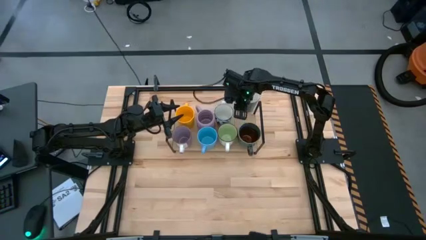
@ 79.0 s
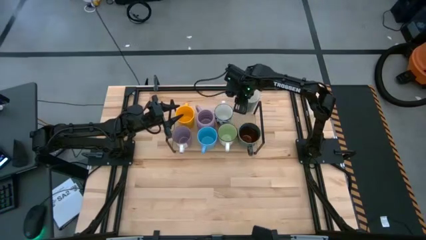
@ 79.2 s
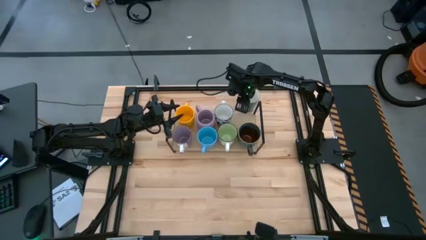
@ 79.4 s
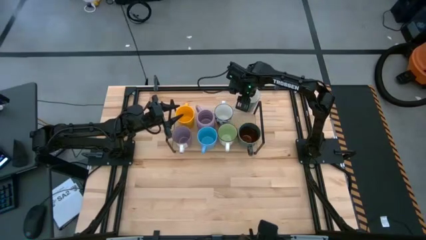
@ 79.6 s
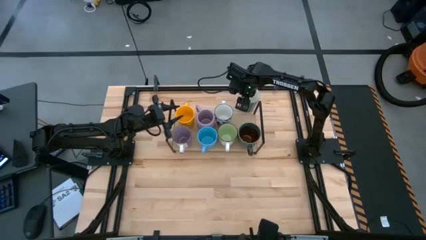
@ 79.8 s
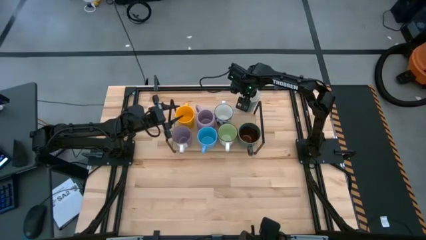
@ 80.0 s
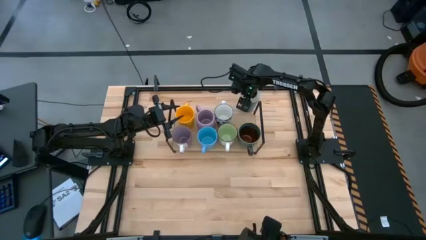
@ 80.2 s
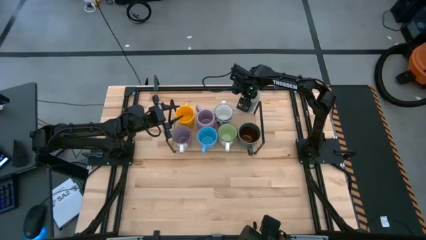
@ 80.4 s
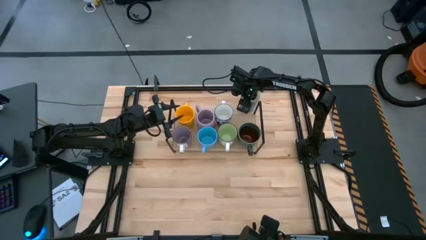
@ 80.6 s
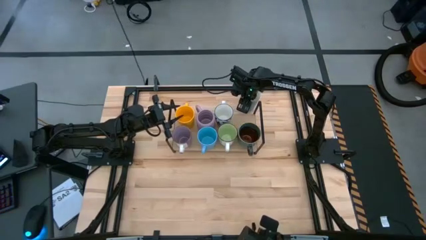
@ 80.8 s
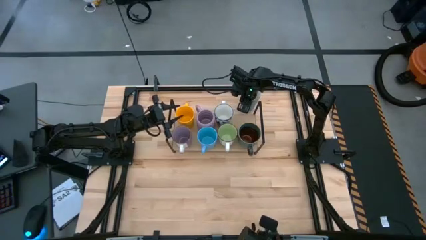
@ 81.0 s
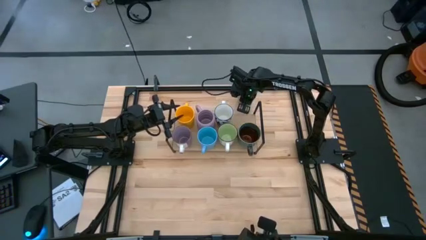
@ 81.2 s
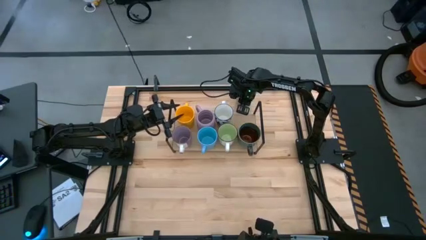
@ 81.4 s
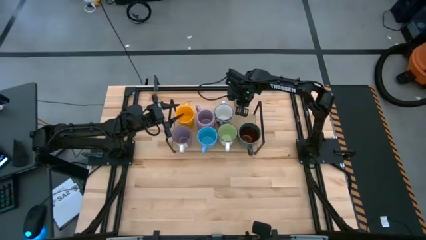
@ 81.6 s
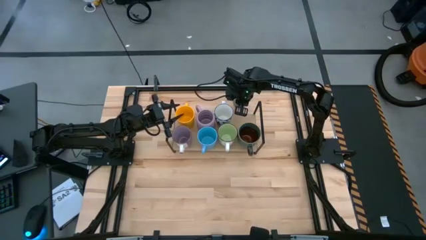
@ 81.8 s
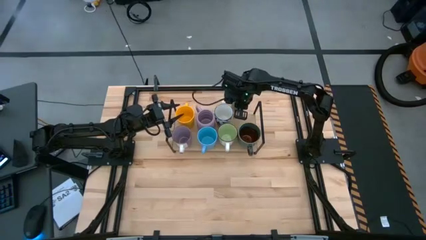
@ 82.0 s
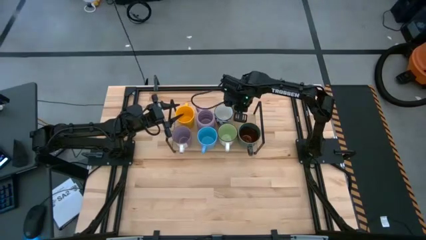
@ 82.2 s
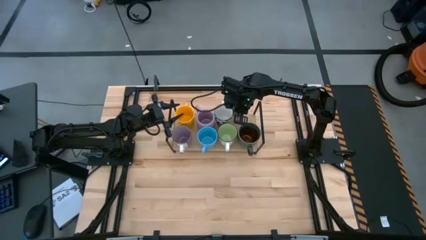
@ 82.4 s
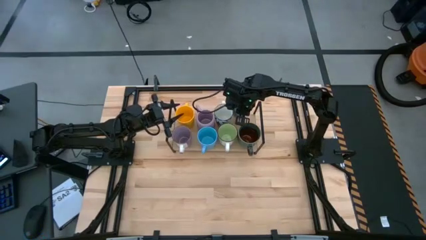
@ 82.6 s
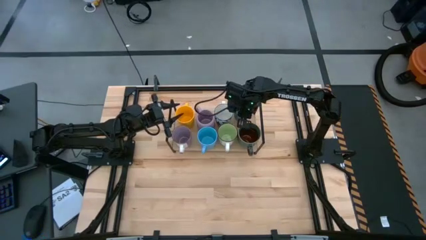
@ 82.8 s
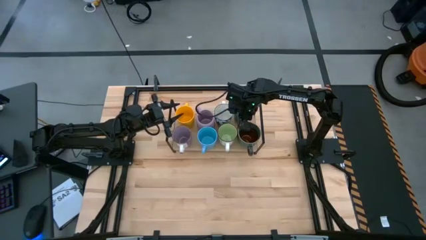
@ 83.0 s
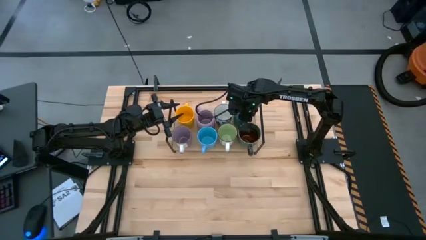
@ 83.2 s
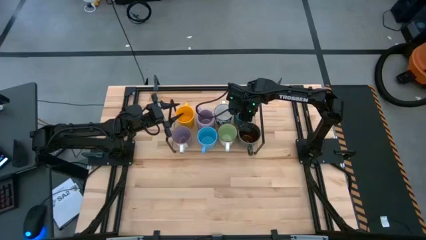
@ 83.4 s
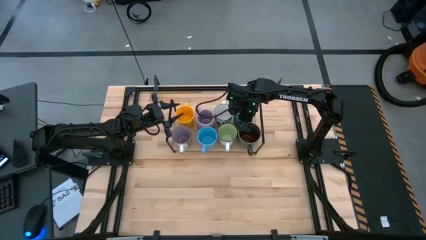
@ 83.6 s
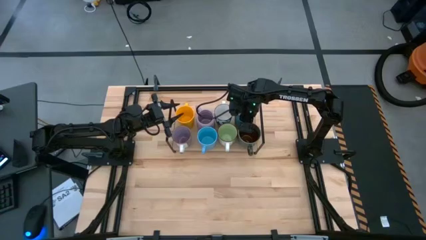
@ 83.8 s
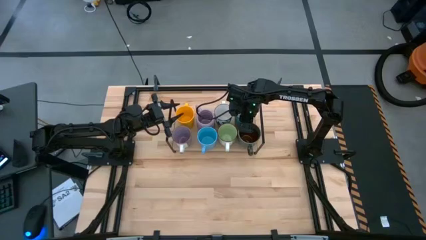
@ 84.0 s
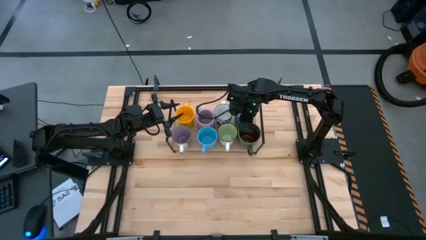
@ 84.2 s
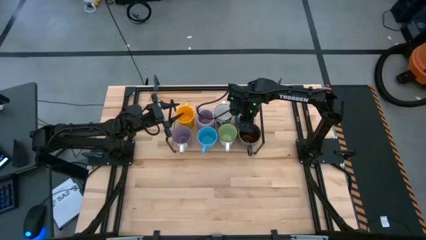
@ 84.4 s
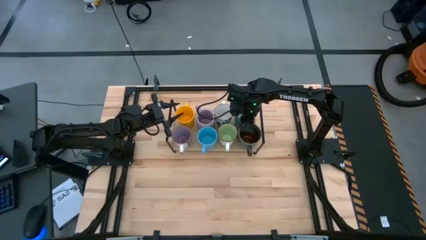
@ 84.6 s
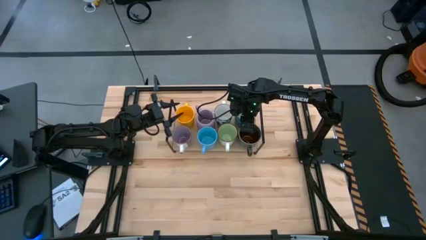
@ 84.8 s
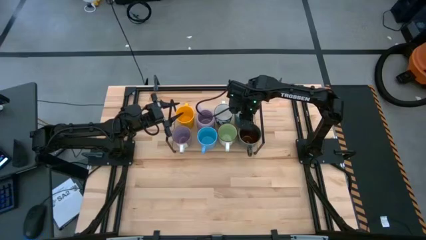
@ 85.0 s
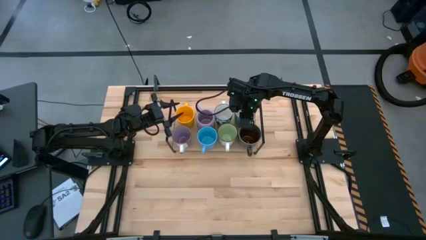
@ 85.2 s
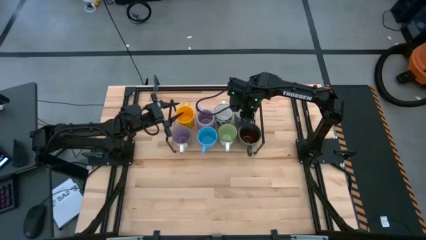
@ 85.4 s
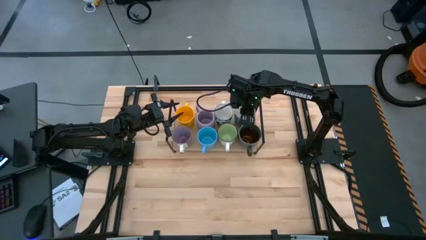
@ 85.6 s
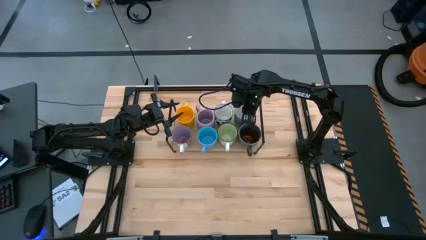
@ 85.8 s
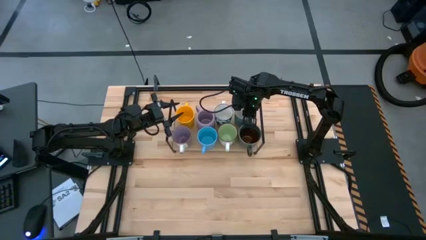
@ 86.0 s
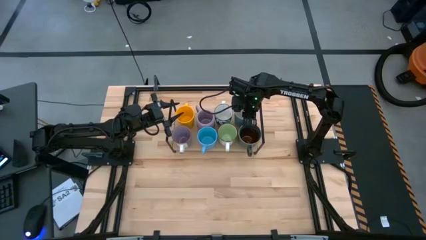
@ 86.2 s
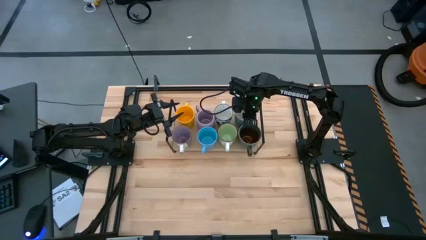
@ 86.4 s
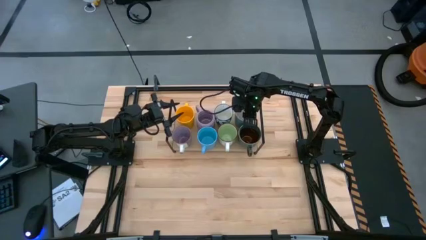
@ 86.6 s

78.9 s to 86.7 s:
Task: Place coffee mugs
Put the blue mug on the shelf

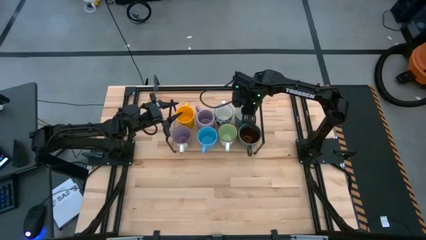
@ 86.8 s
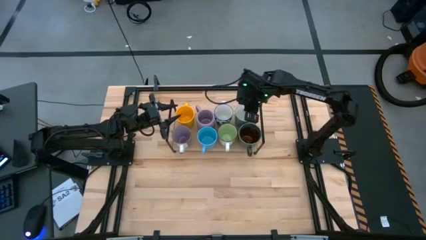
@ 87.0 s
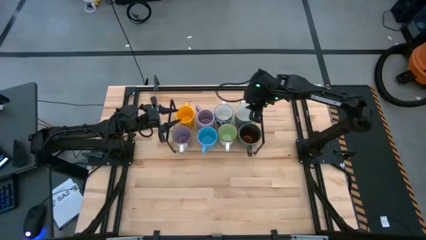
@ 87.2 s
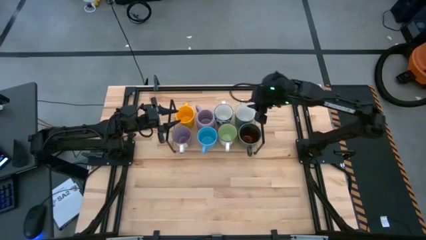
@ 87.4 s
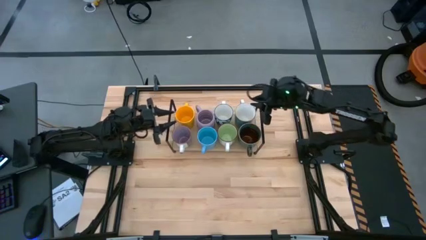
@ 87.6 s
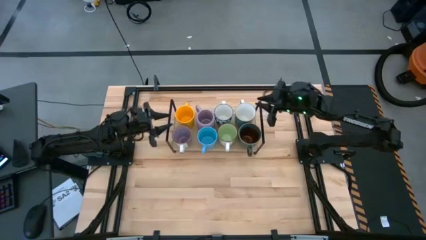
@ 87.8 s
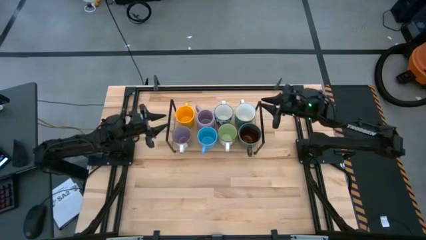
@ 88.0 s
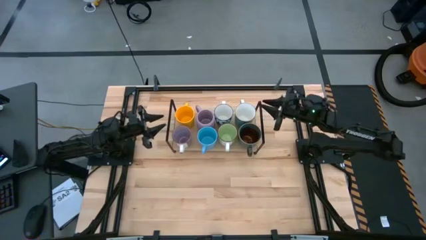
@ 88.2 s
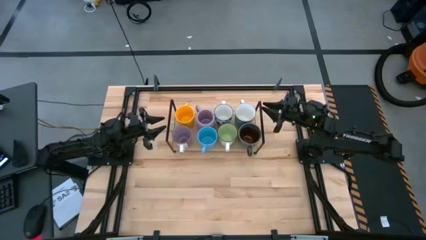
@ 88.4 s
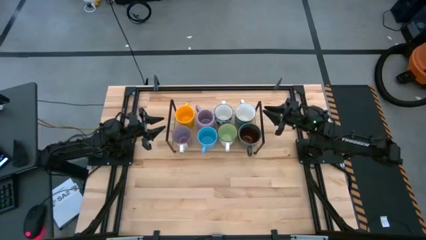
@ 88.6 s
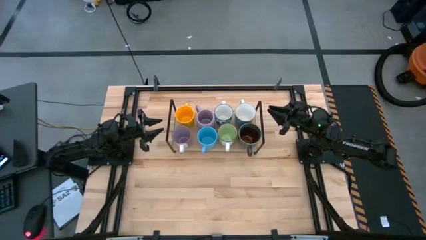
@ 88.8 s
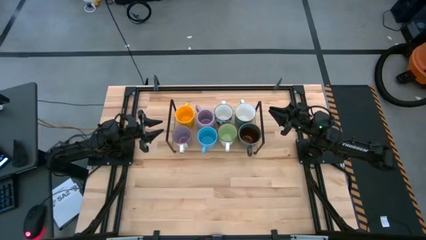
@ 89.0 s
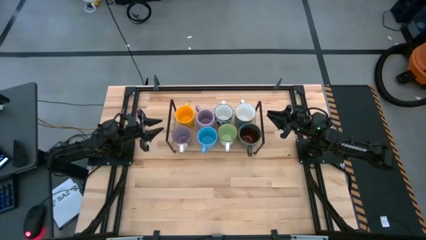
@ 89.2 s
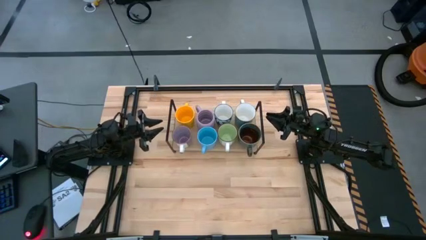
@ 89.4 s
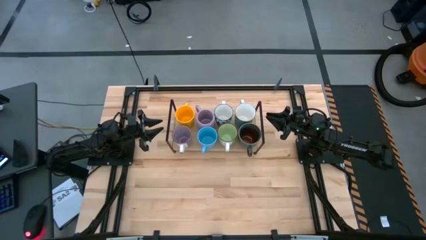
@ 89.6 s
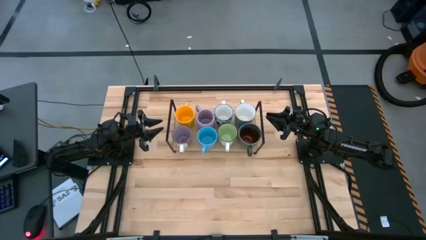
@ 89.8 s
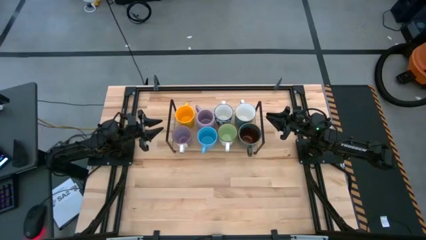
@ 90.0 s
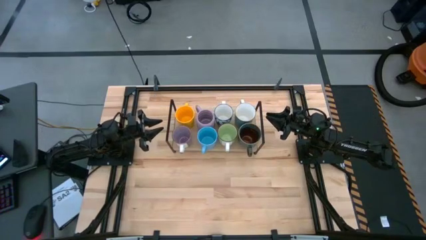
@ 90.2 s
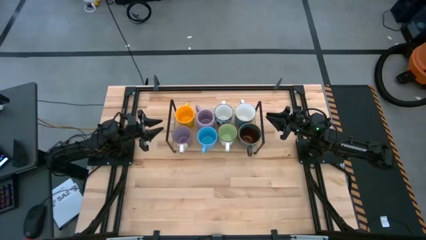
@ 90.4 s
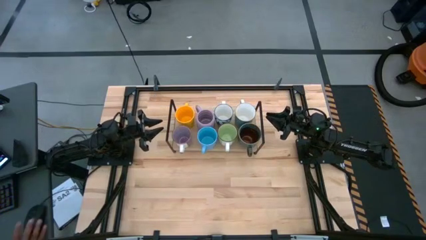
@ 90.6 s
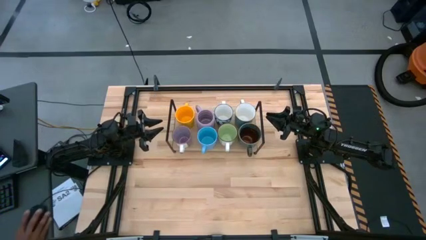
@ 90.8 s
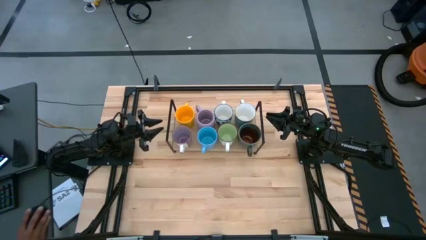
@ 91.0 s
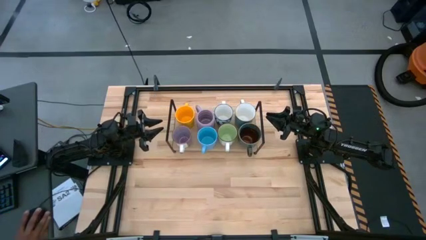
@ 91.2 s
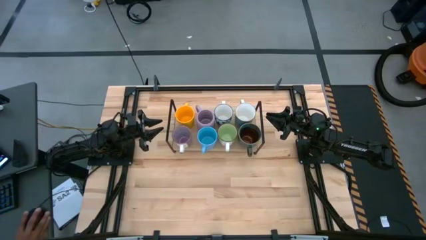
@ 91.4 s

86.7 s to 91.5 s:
Return to Home Position

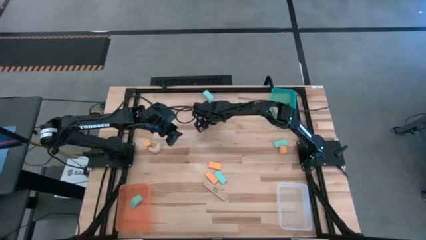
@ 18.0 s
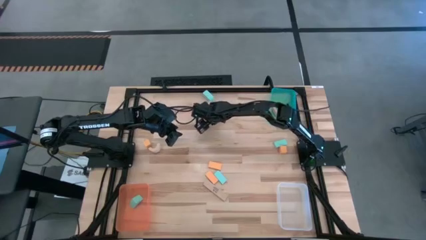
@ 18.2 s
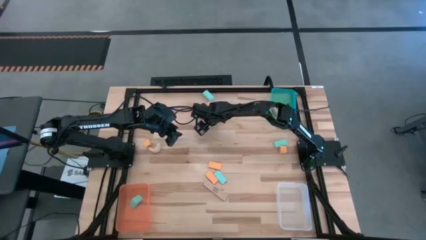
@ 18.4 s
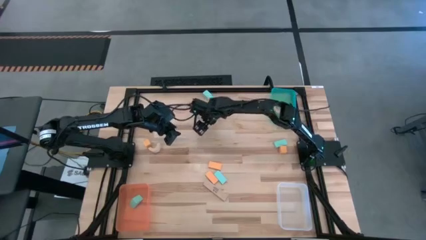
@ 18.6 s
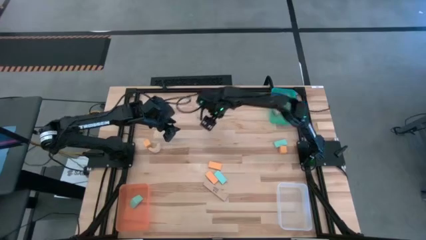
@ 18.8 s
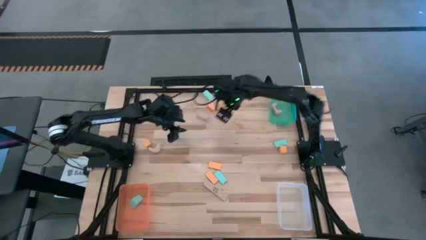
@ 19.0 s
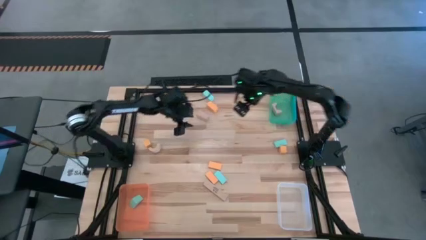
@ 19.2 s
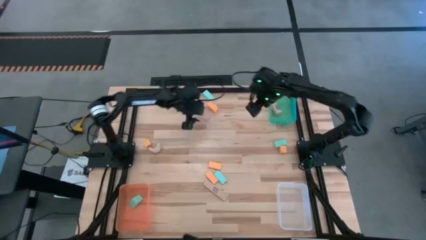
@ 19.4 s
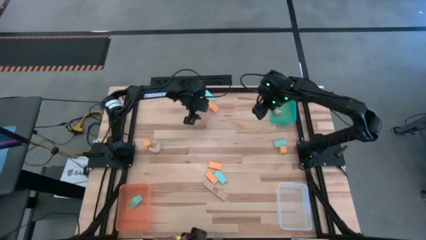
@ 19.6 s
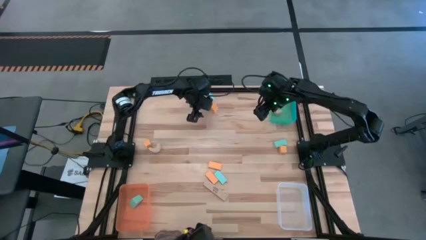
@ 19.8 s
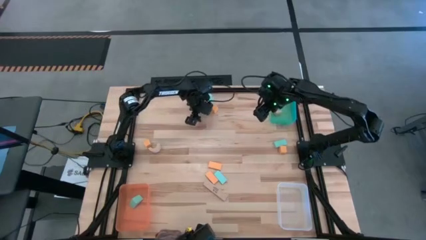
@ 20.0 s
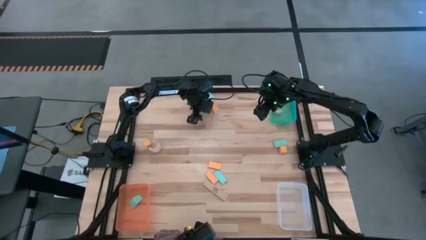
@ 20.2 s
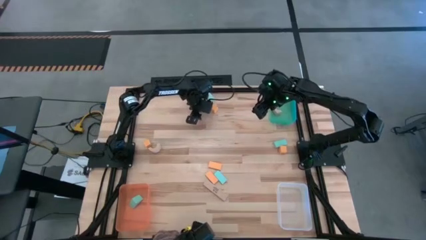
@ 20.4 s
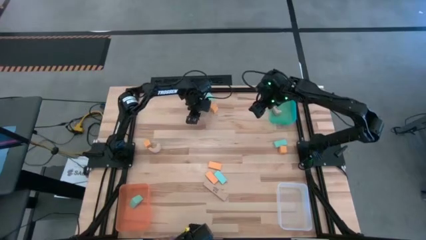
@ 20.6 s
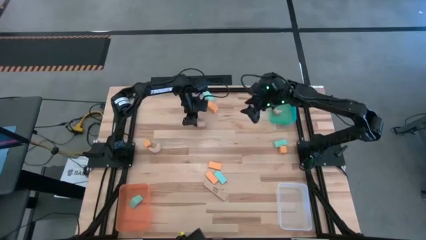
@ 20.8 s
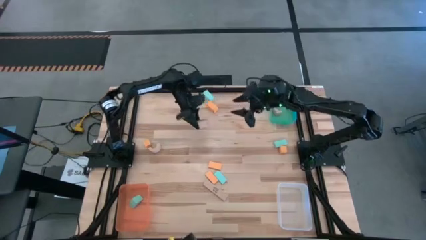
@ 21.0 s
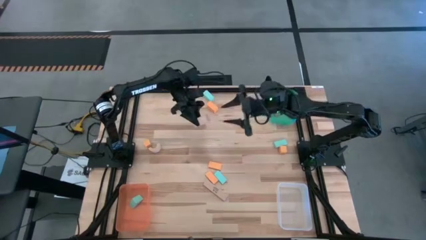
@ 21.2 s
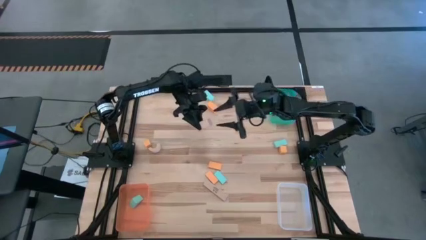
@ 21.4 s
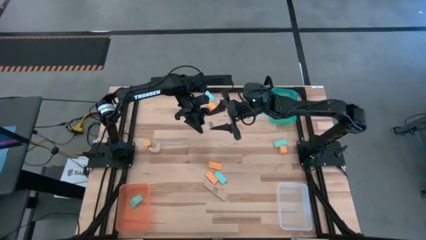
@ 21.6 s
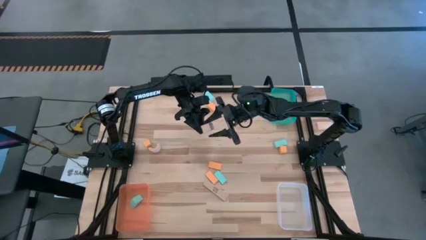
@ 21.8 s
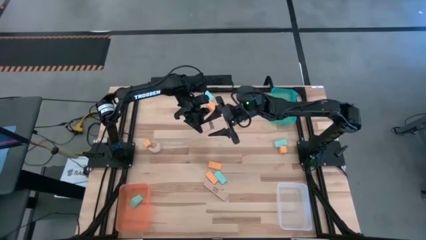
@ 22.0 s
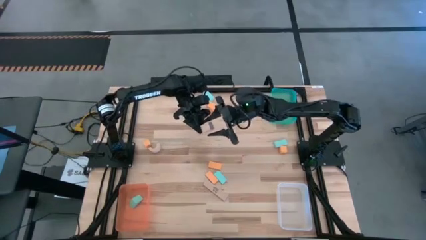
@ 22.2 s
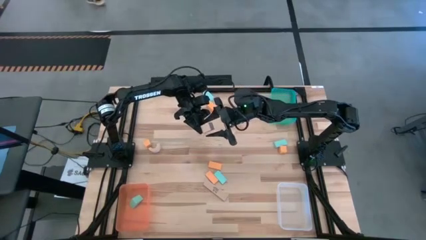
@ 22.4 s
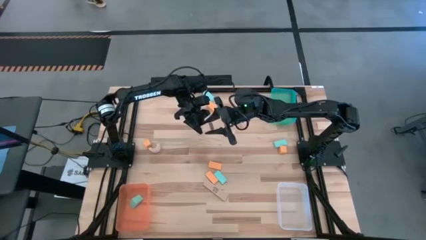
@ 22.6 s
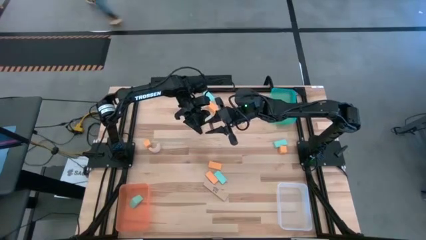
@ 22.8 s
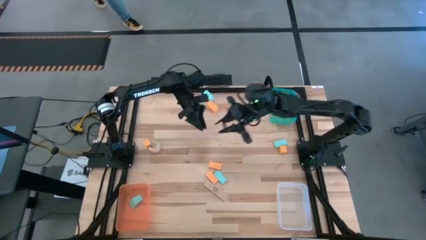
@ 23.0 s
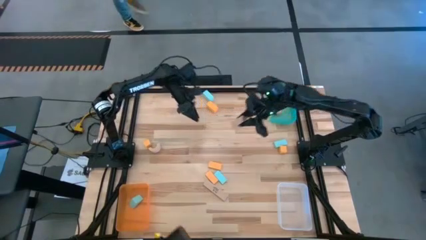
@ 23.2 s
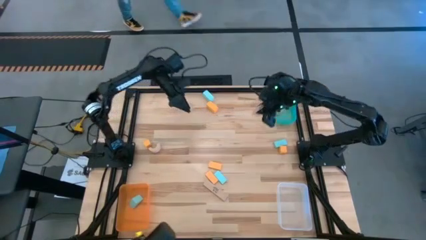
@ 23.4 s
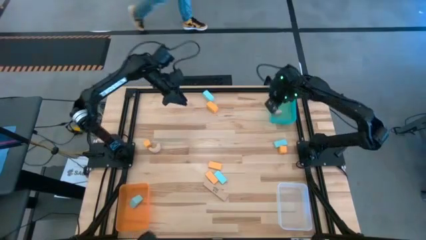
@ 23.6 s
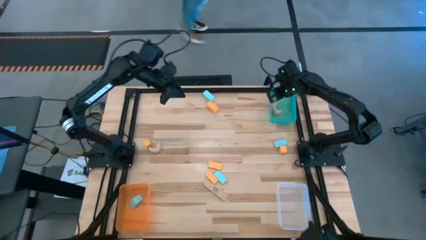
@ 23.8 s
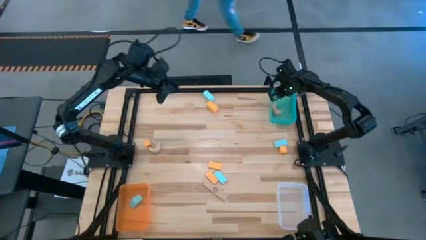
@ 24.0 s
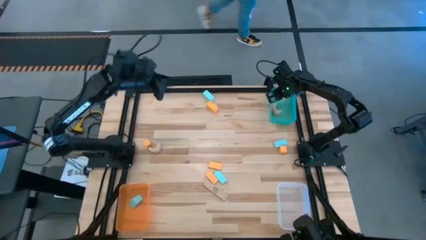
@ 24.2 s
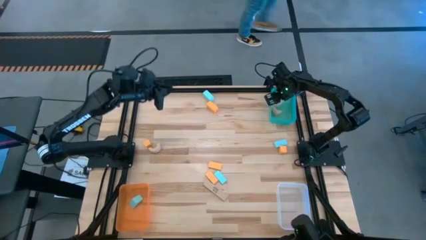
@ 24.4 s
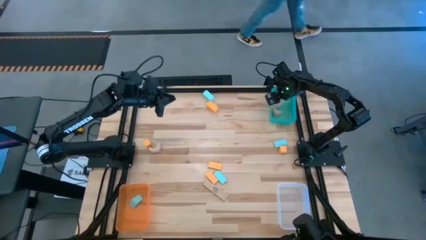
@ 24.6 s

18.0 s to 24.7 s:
Task: Sort & place blocks by color
Put the brown block into the green bin
